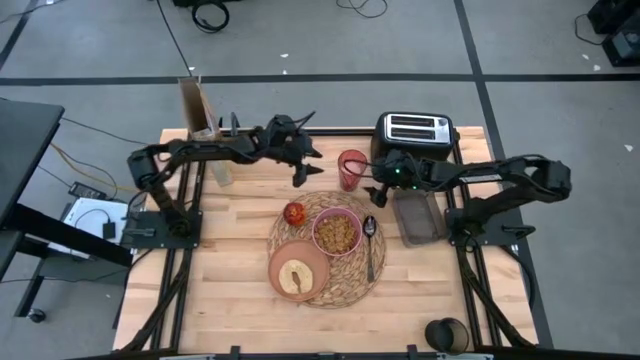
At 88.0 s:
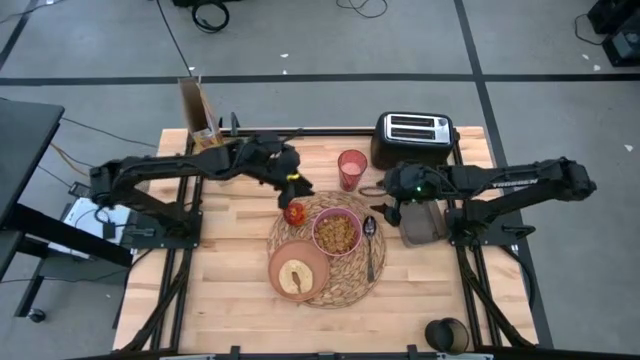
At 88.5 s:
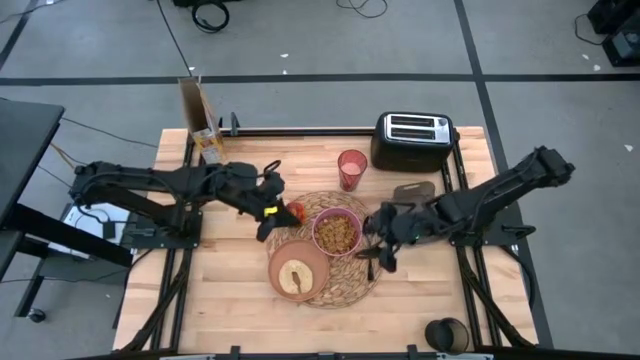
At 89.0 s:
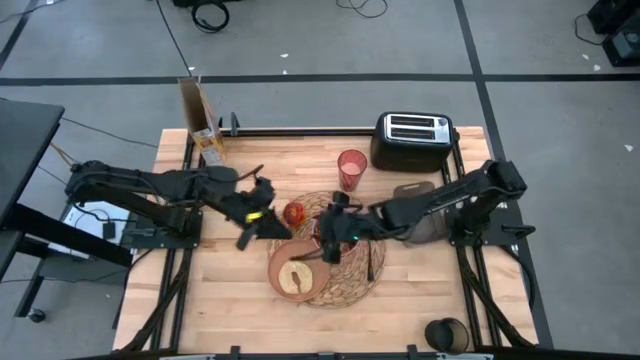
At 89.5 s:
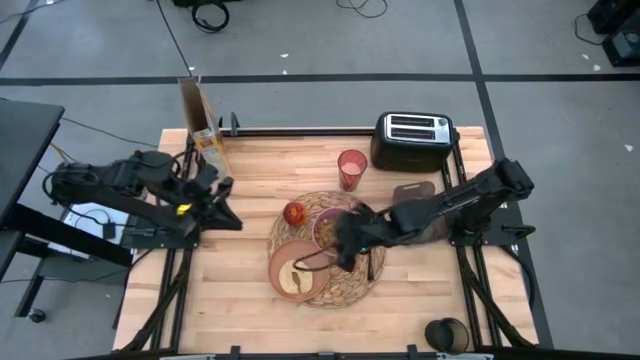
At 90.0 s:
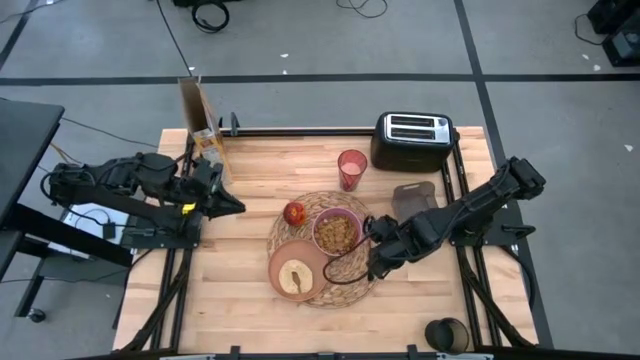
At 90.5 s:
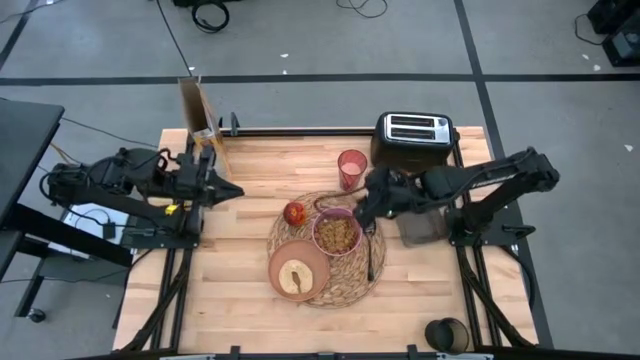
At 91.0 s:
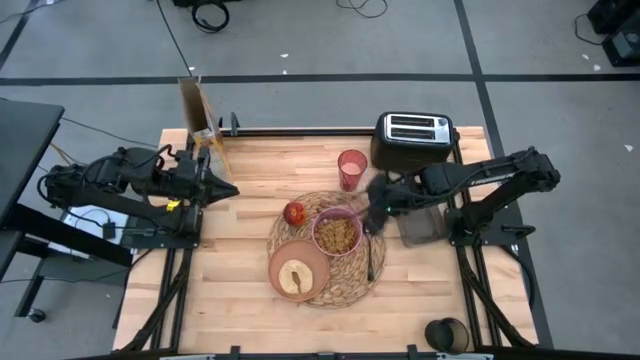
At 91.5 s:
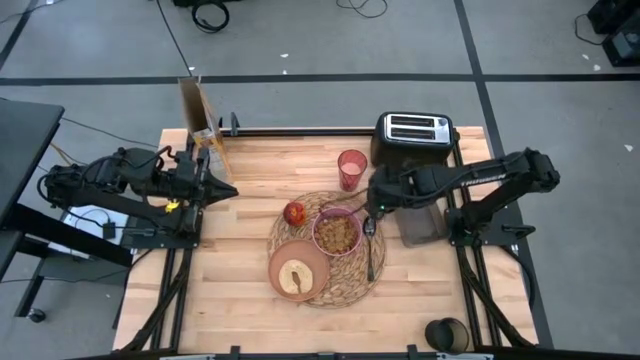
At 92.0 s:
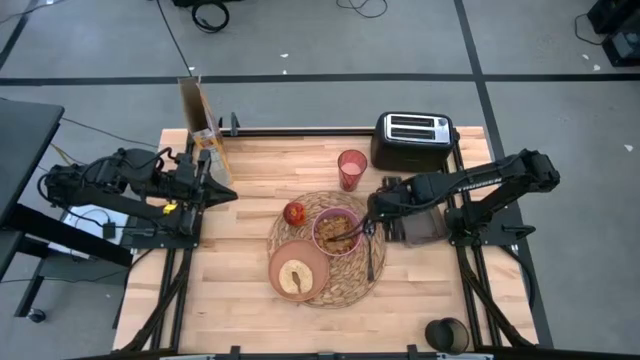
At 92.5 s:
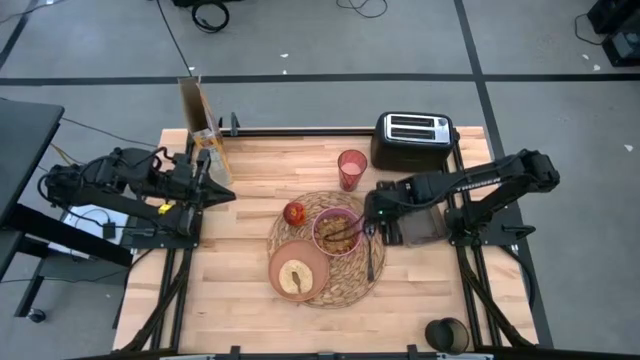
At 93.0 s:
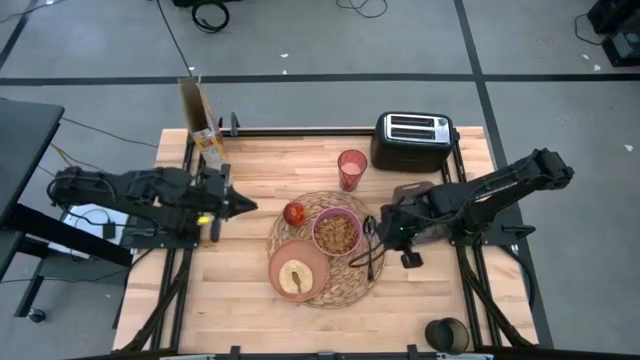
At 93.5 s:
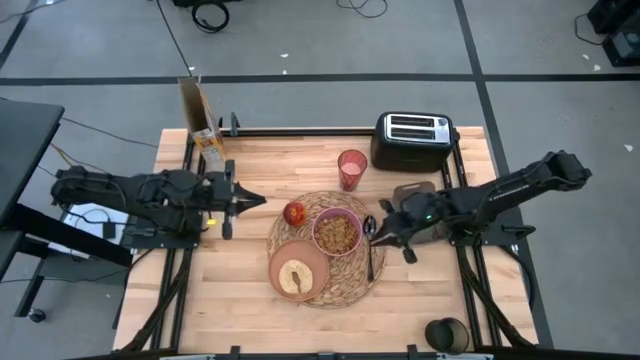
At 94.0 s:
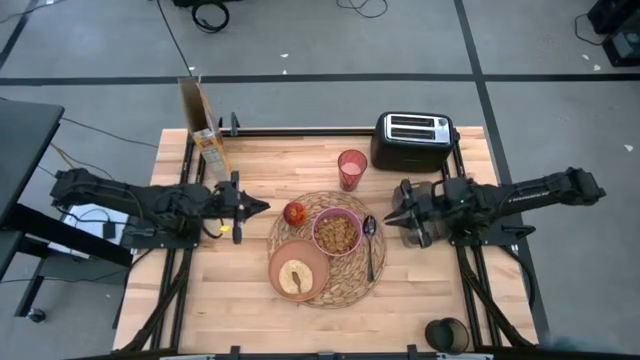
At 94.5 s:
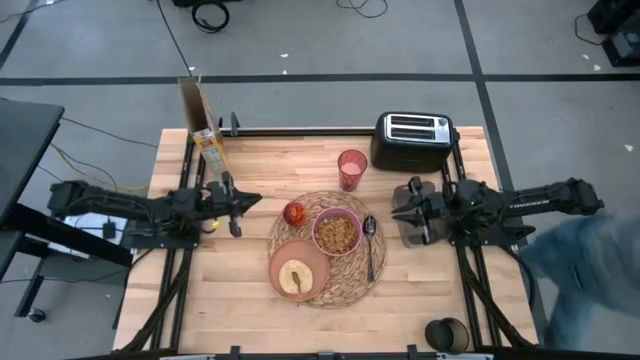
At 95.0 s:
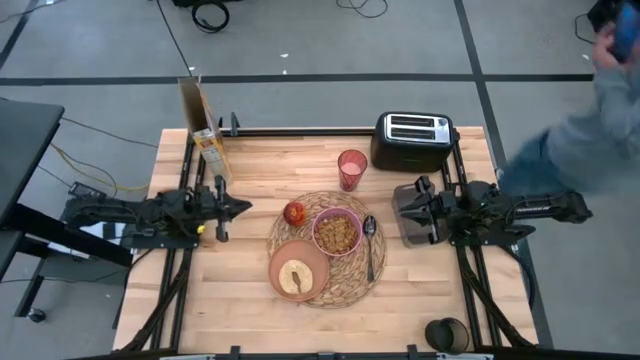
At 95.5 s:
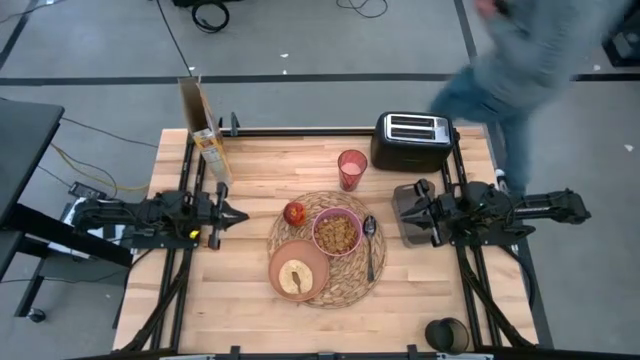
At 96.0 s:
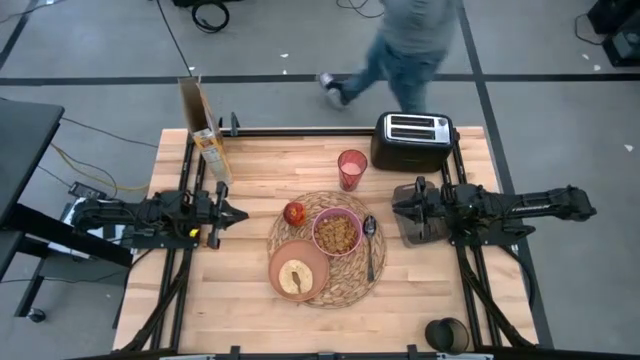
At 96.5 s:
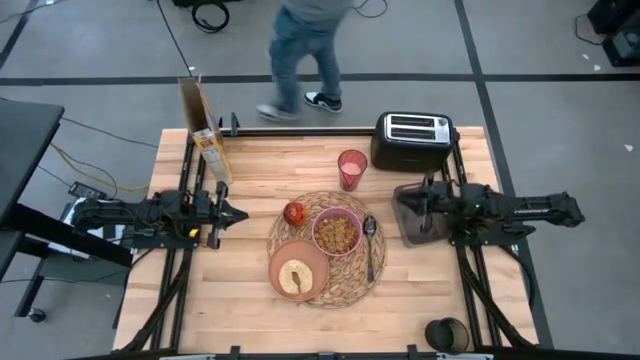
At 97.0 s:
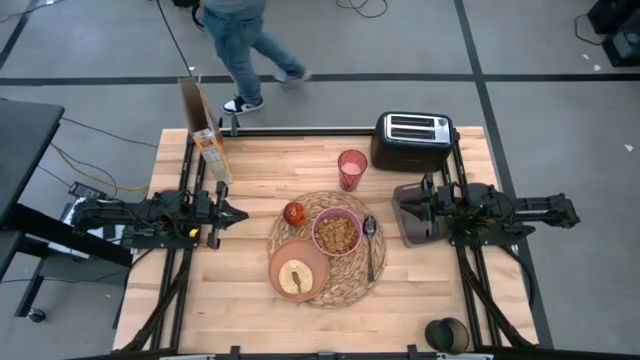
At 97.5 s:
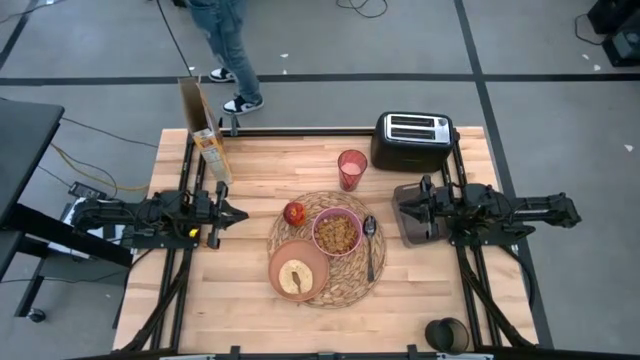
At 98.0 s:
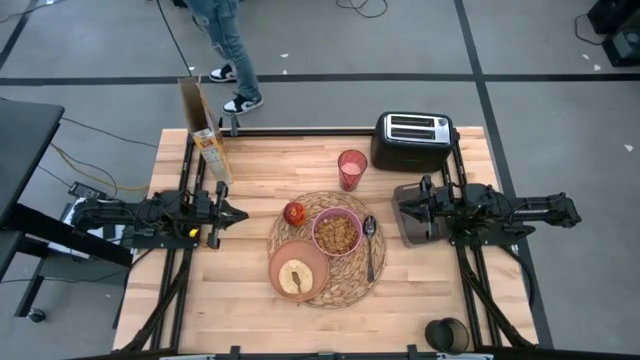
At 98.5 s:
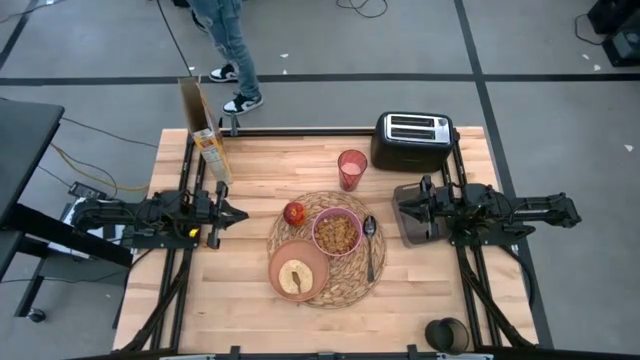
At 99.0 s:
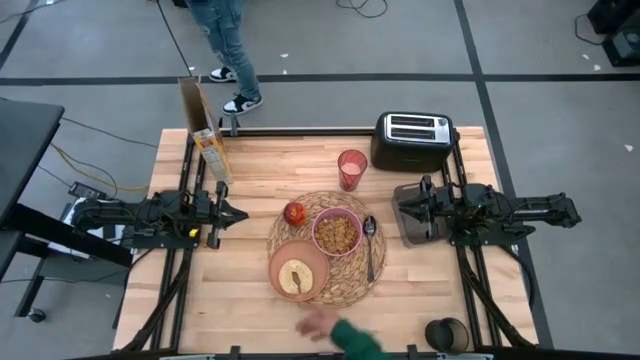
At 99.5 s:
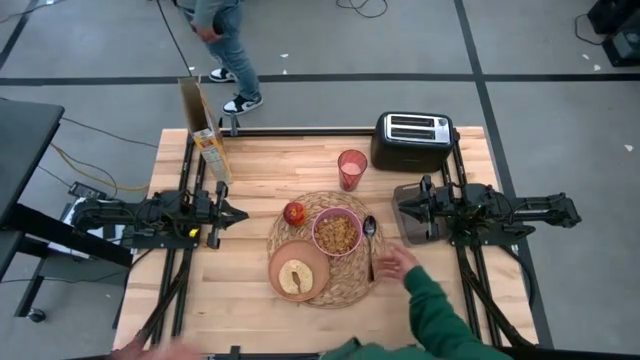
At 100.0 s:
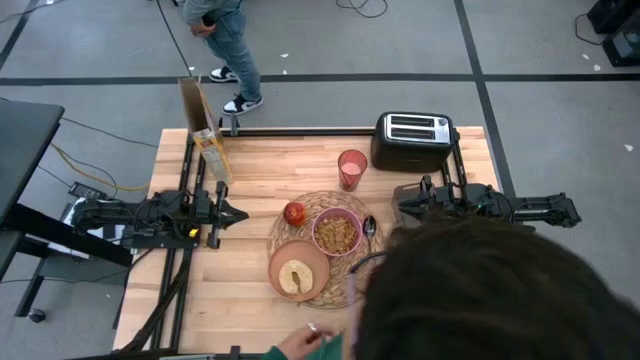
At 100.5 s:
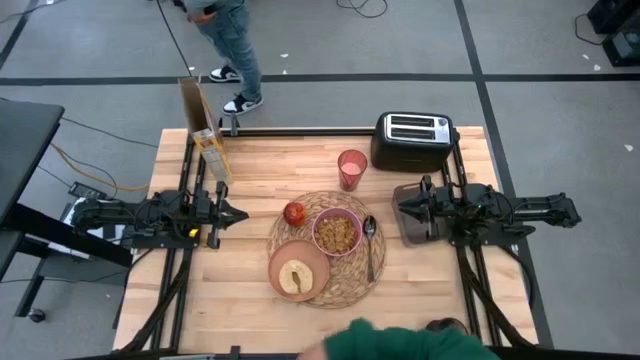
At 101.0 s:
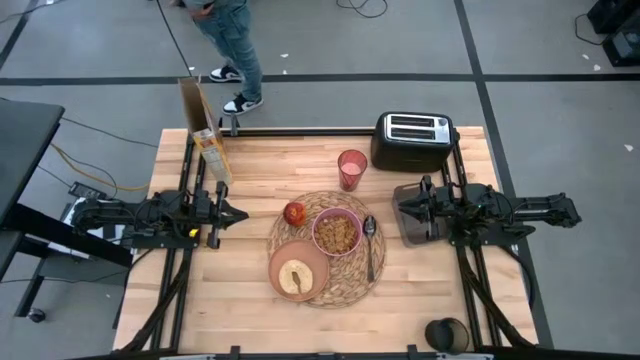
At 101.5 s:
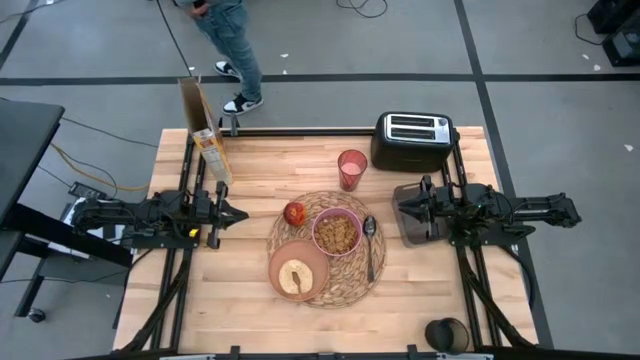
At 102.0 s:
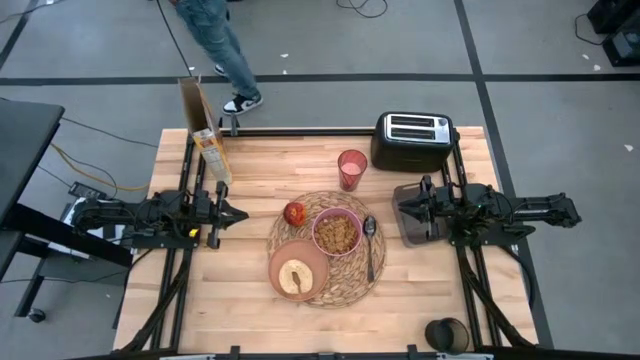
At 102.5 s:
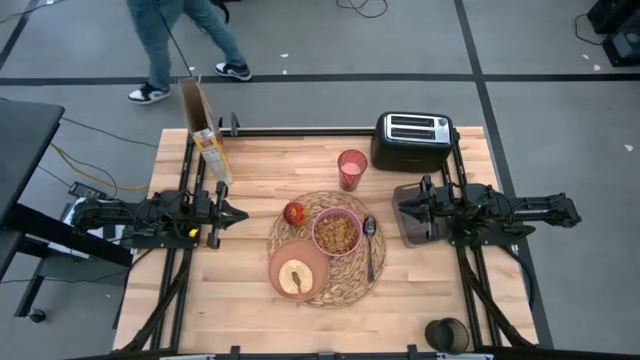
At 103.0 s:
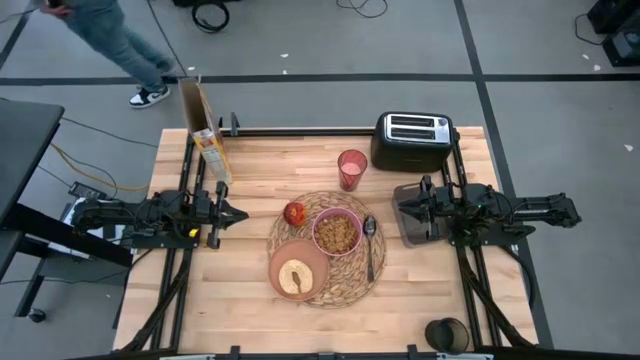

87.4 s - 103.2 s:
Task: Arrange a breakfast setting
Return to Home Position

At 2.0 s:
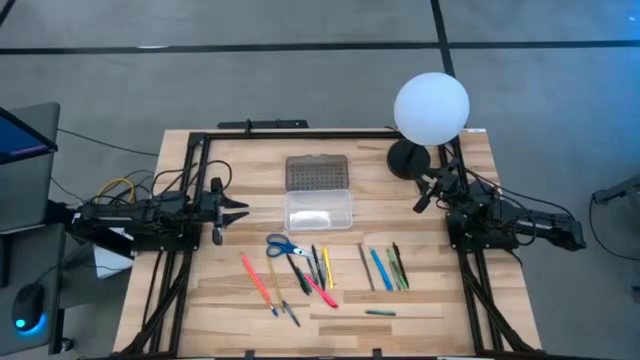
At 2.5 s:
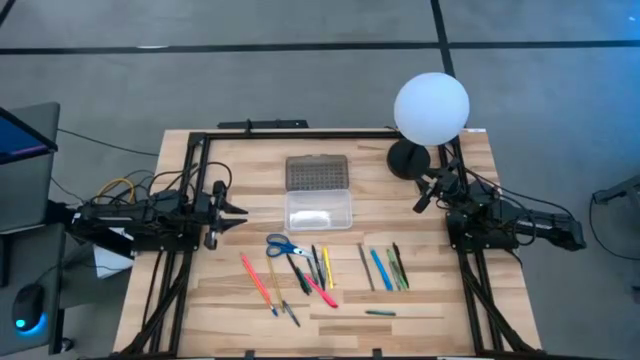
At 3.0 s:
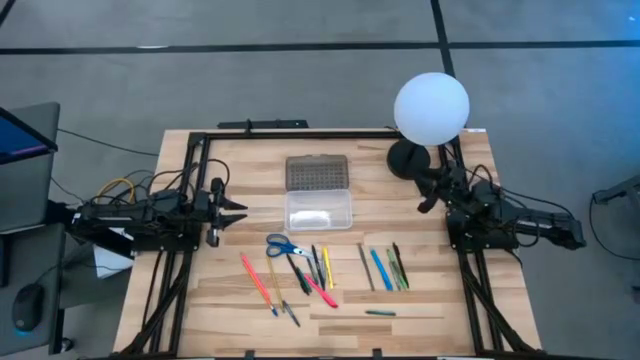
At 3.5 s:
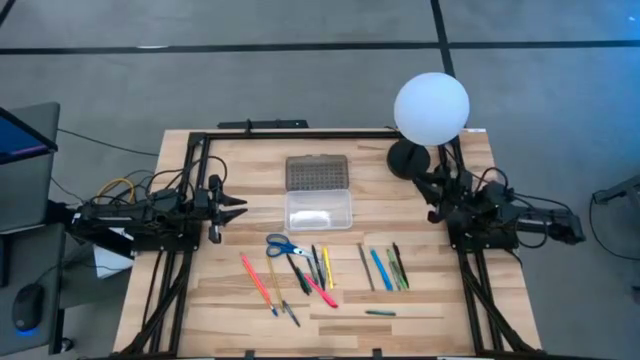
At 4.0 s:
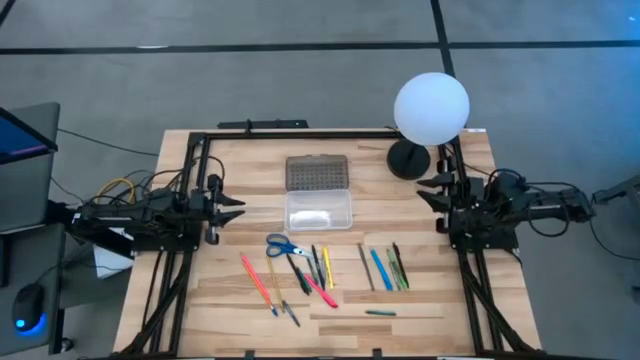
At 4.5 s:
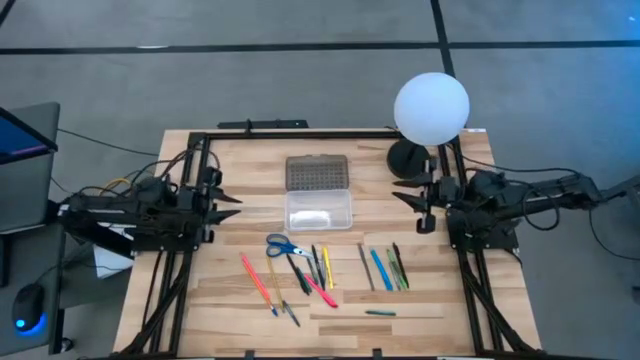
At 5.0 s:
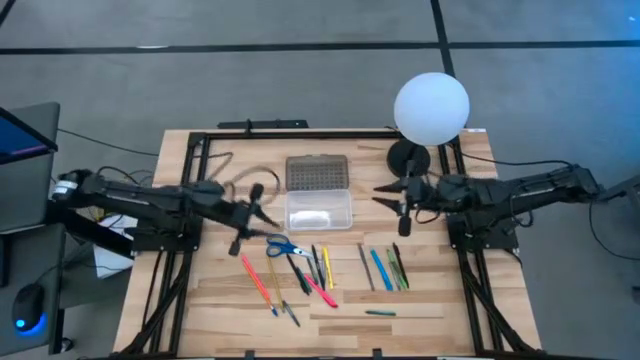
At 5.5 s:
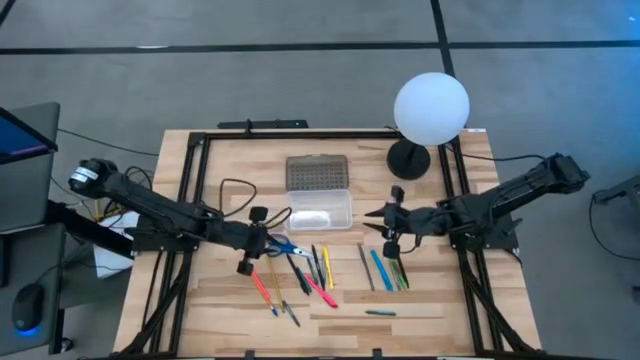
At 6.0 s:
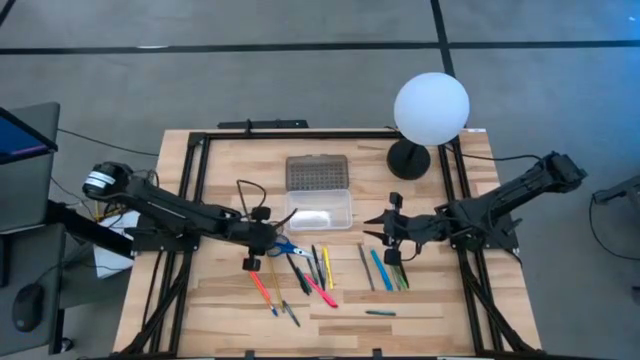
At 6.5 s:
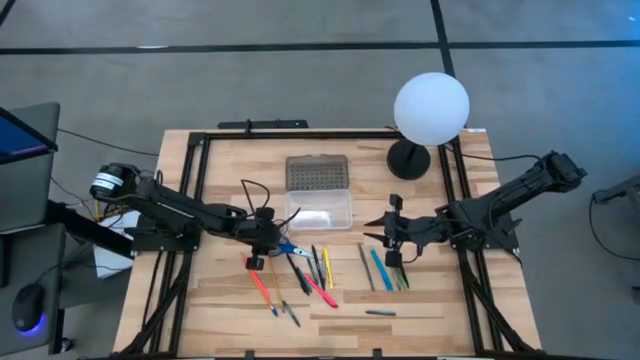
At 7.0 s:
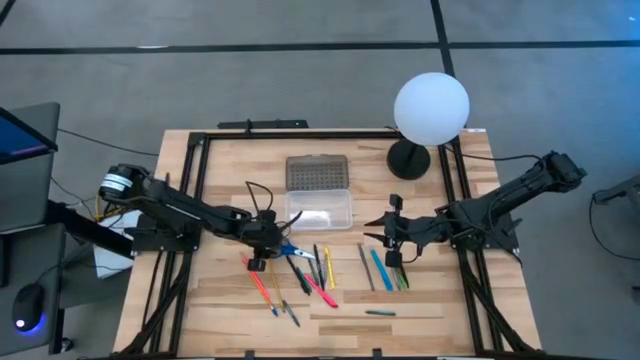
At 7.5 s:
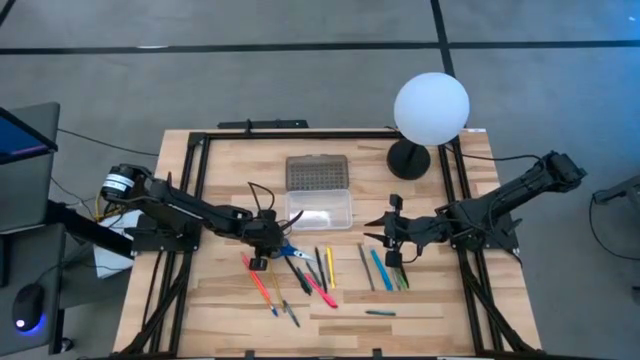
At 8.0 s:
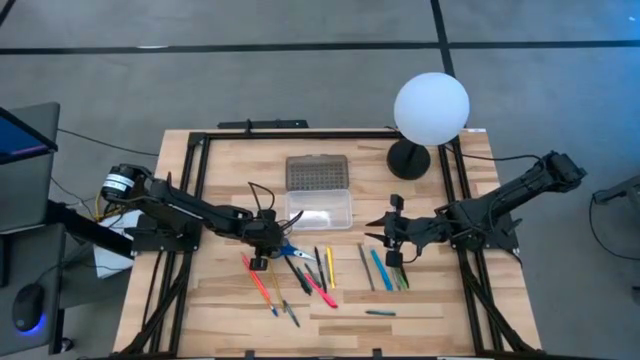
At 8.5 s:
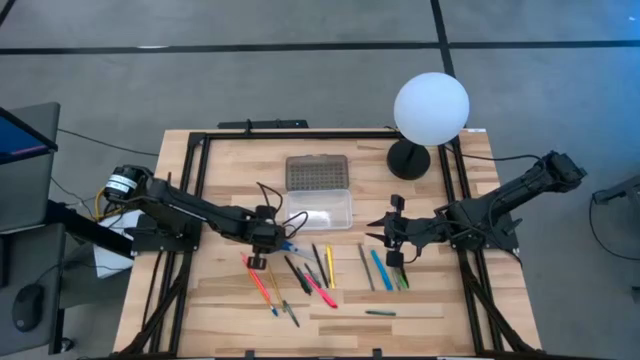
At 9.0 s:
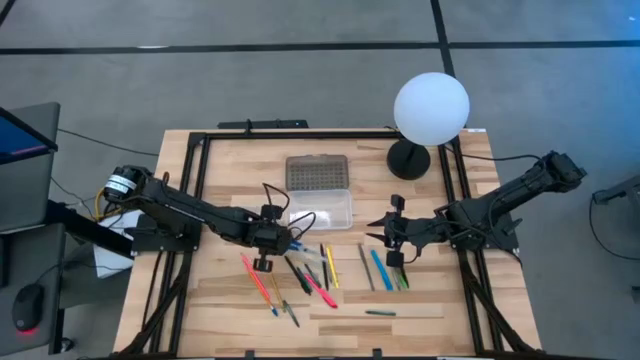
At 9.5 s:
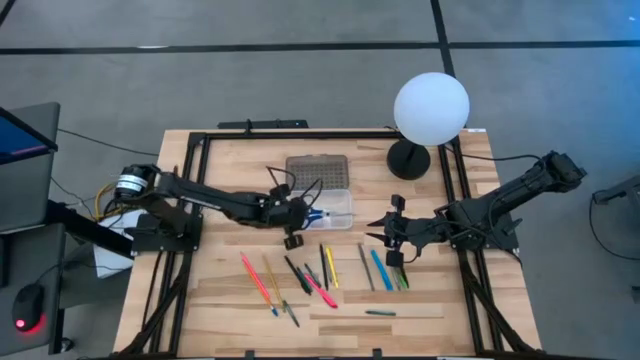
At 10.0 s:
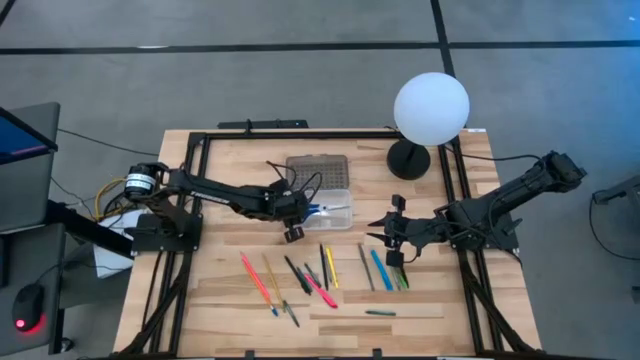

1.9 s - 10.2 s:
Task: Pick & place school supplies into a supply box
Put the blue scissors into the gray supply box
